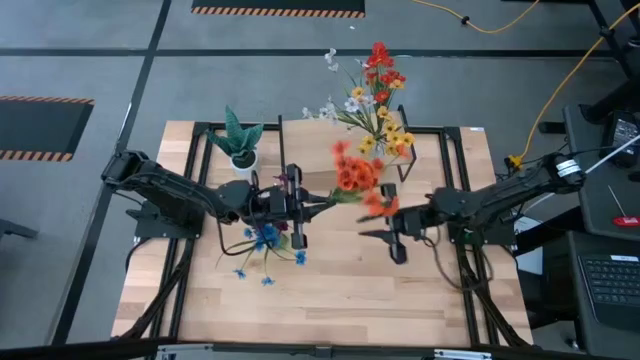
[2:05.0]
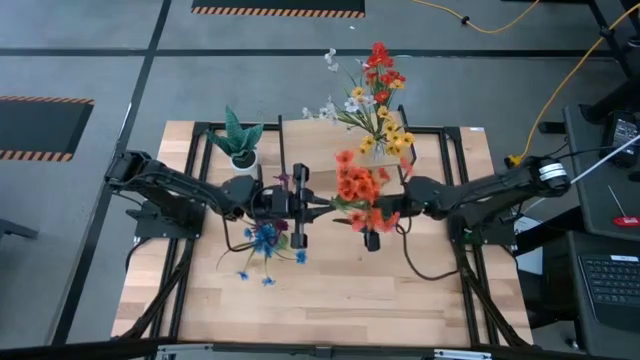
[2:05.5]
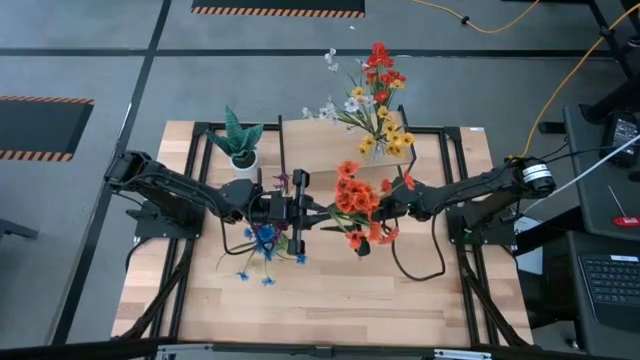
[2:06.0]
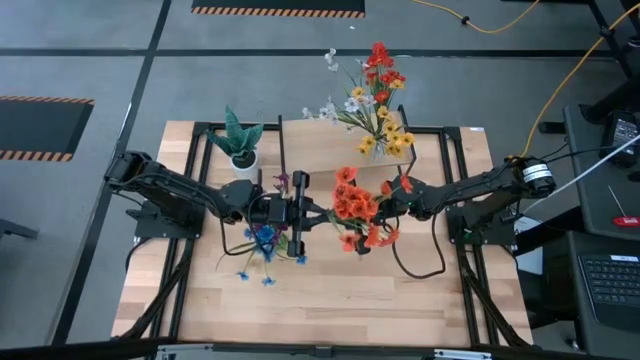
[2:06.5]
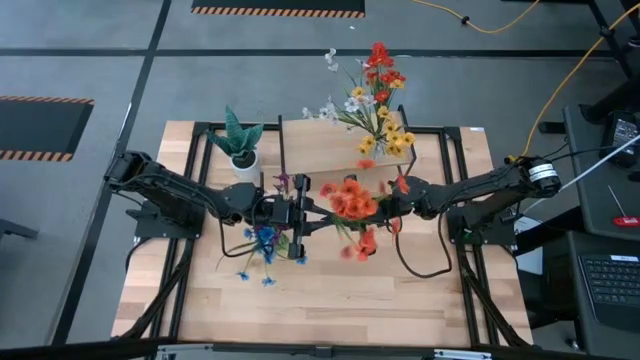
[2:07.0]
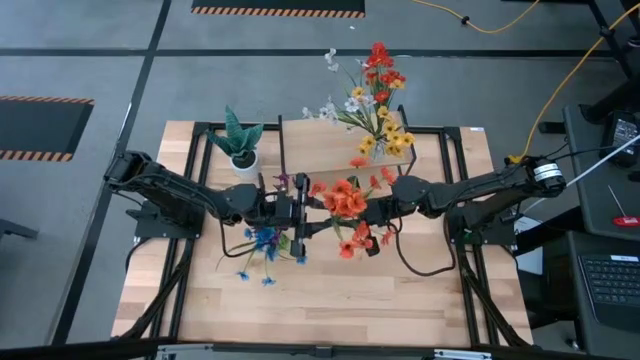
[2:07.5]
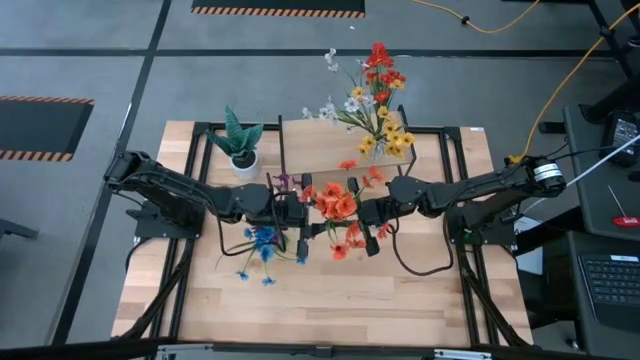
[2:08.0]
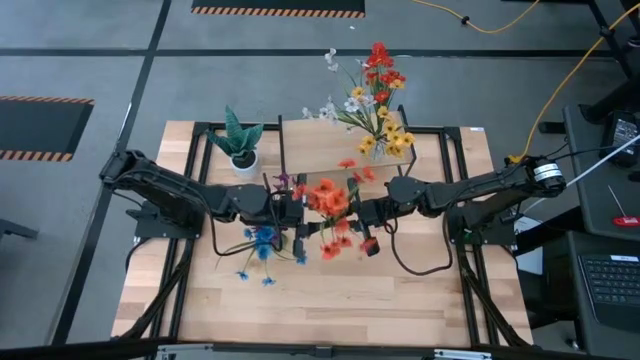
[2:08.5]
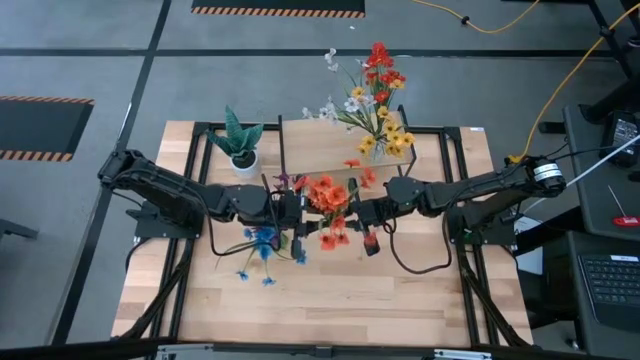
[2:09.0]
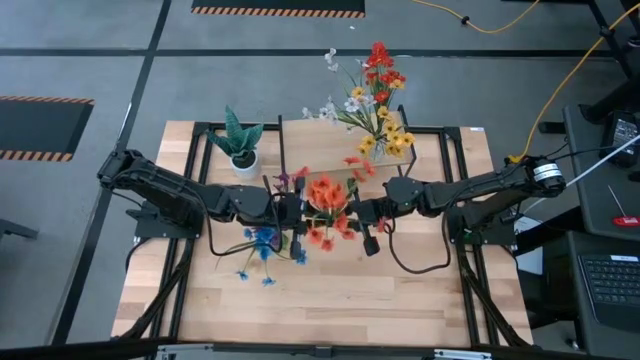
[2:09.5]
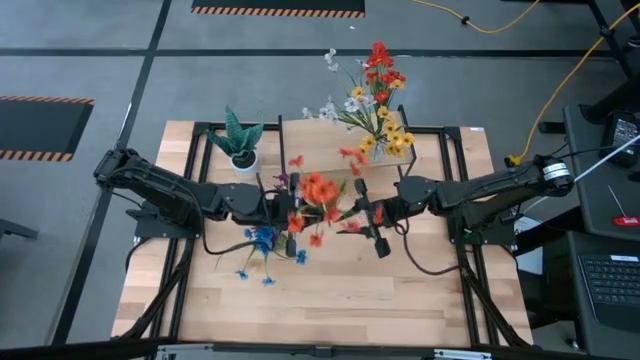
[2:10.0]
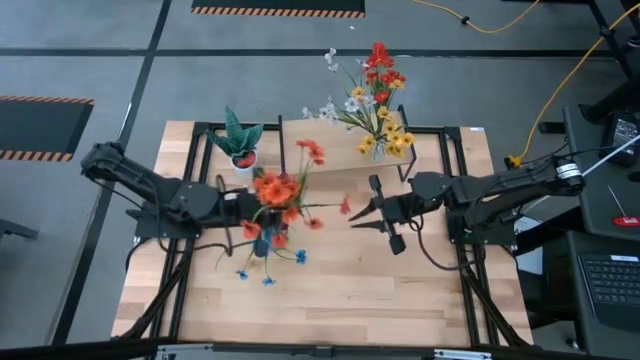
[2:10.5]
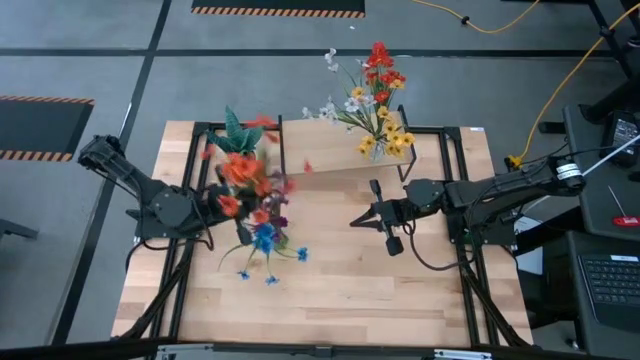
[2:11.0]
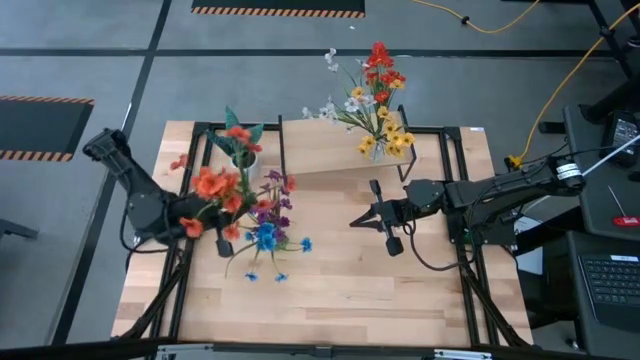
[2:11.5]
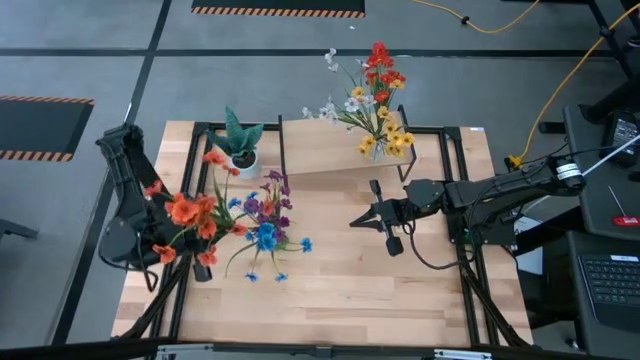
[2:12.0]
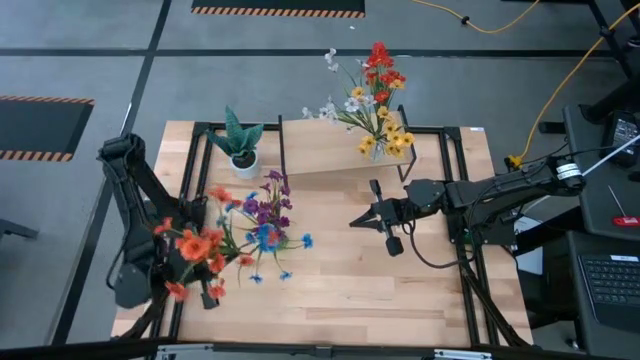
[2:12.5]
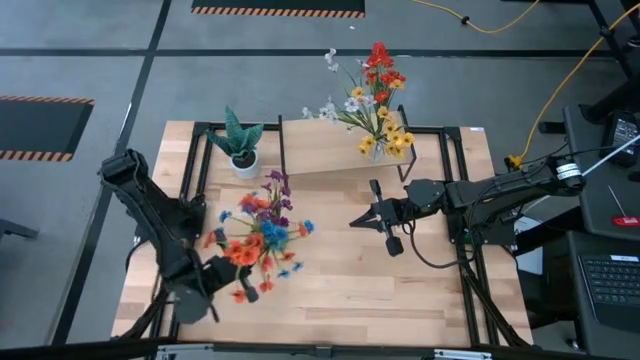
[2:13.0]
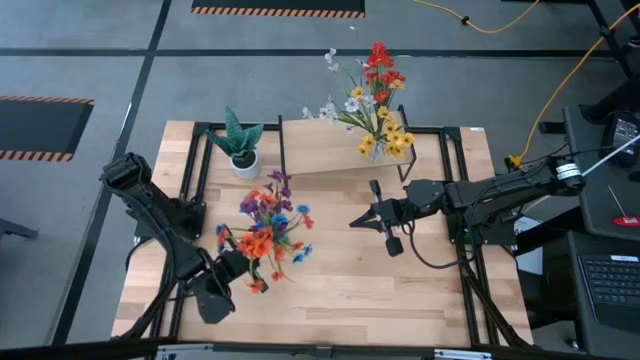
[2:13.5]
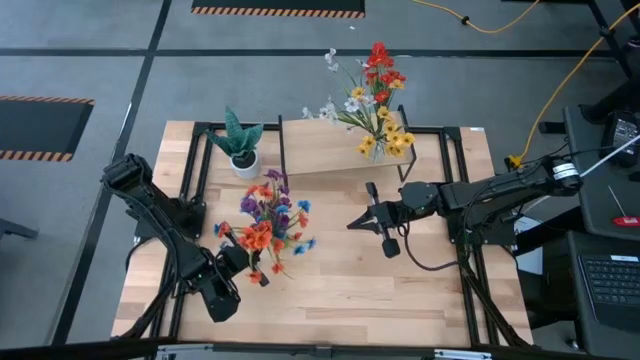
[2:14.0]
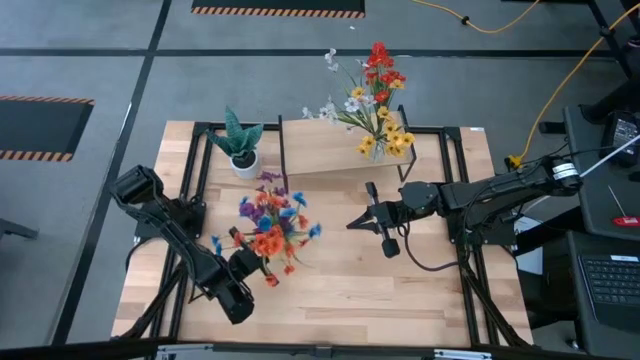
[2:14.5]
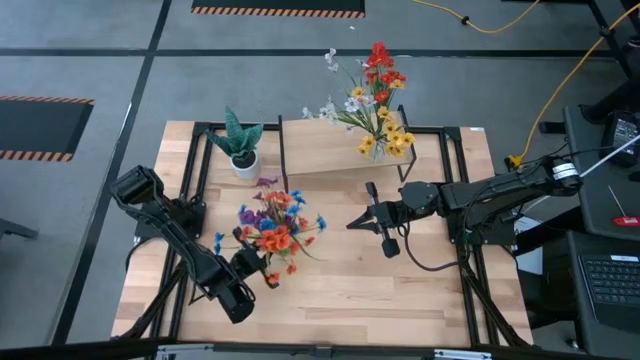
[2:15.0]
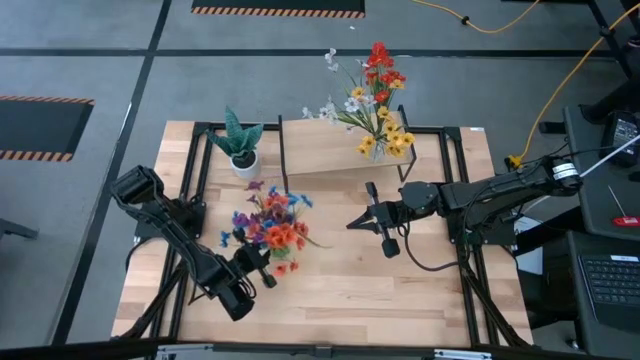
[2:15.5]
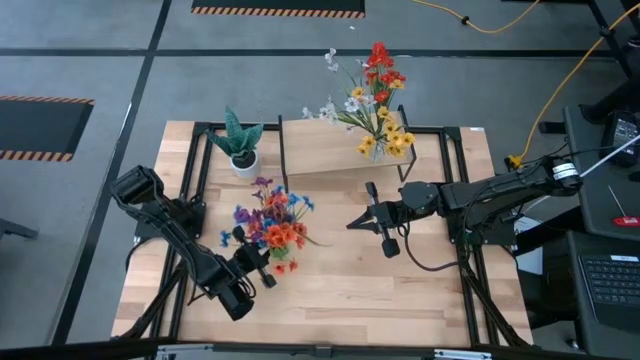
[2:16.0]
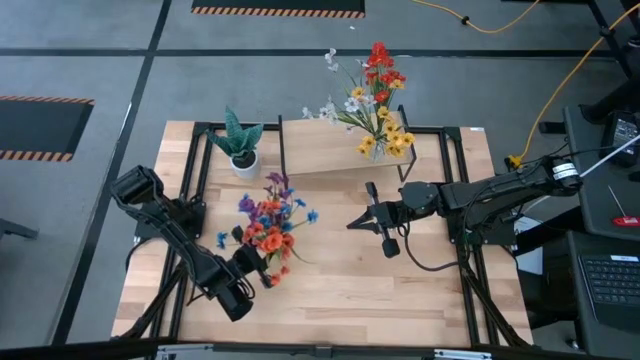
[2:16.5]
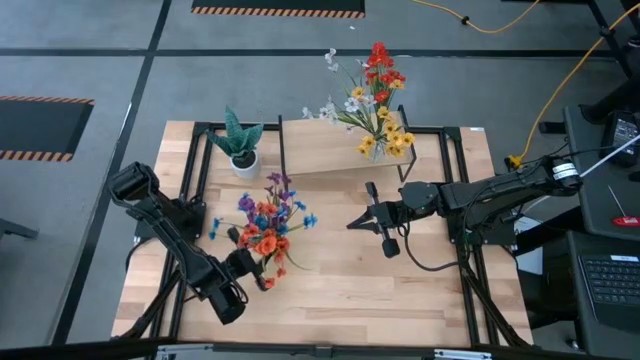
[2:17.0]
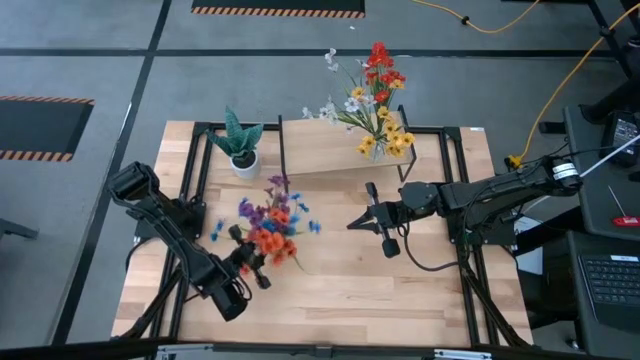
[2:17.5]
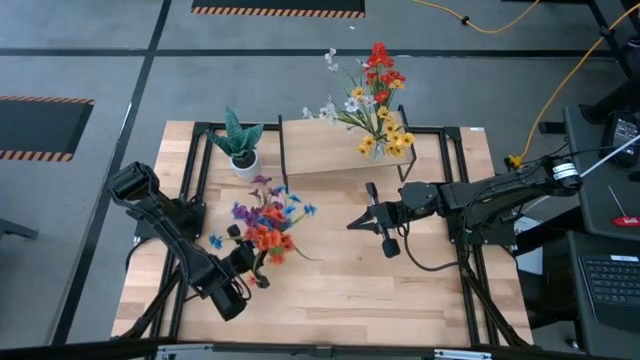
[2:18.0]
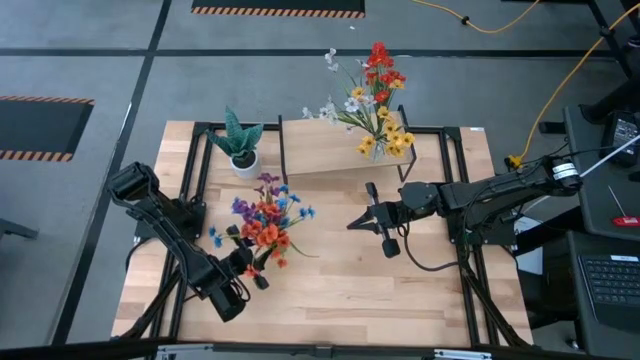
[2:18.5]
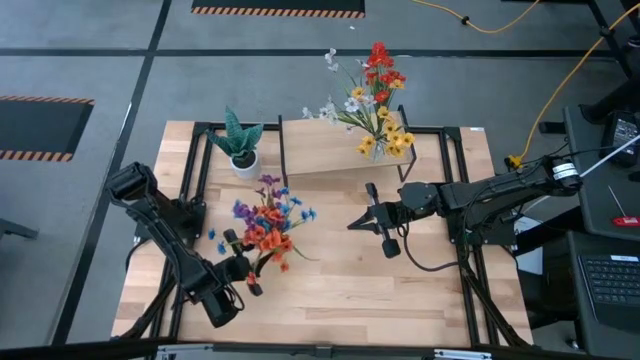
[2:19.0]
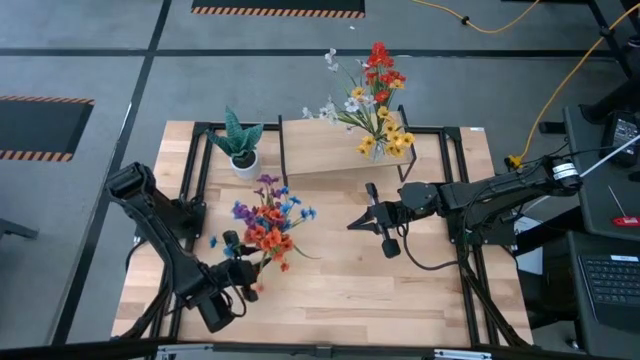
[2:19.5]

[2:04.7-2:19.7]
Task: Pick and place flowers into a vace then onto a shelf
Put the orange flowers into the green transparent vase

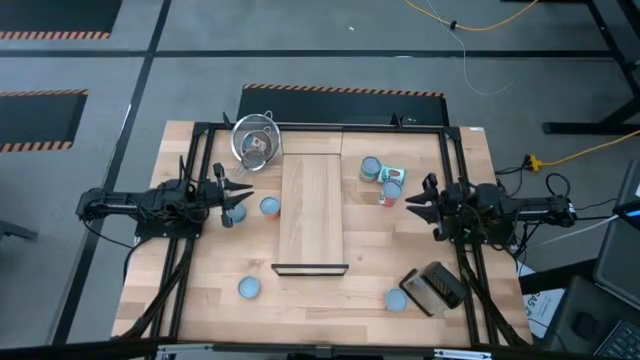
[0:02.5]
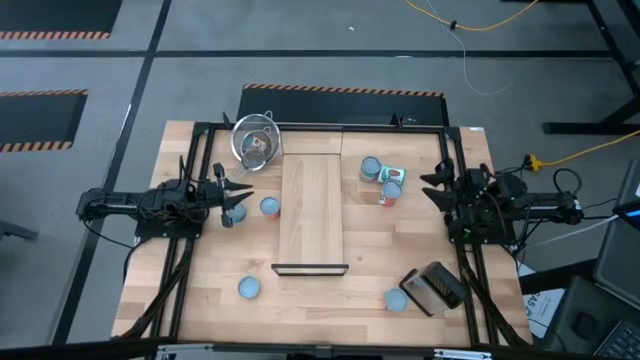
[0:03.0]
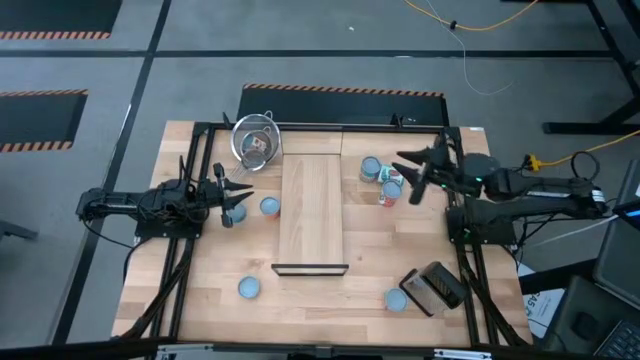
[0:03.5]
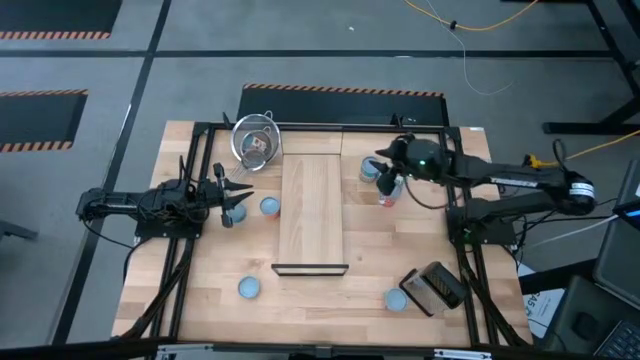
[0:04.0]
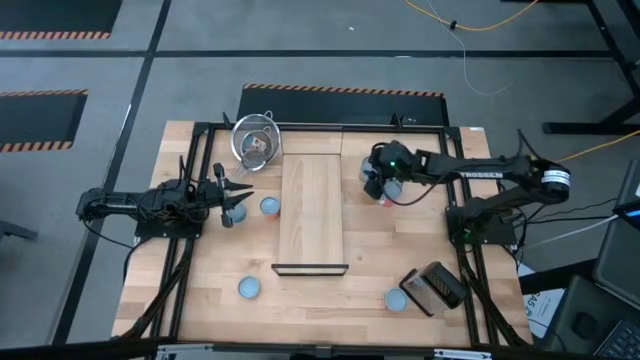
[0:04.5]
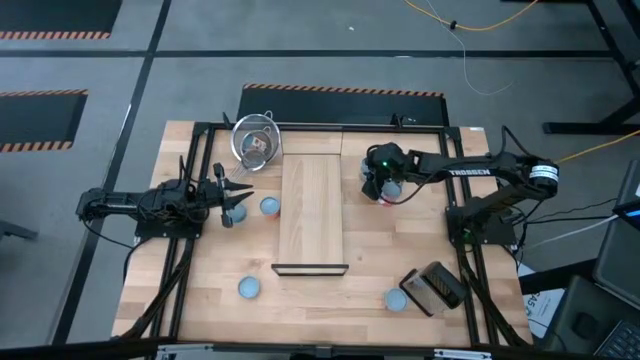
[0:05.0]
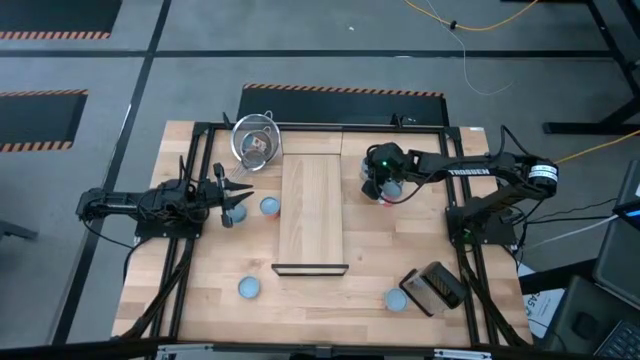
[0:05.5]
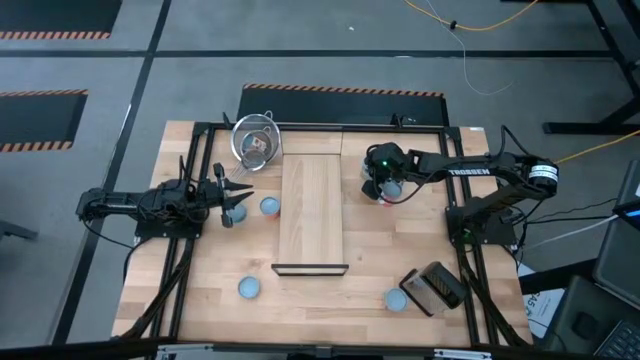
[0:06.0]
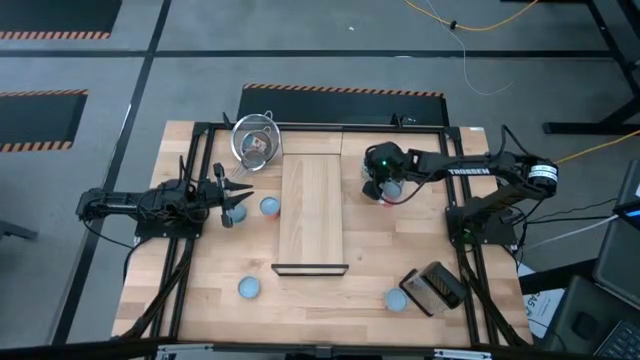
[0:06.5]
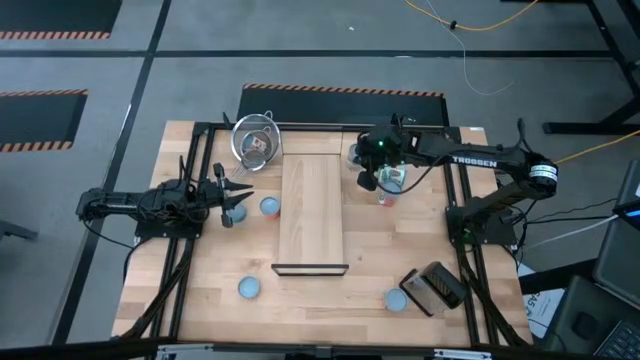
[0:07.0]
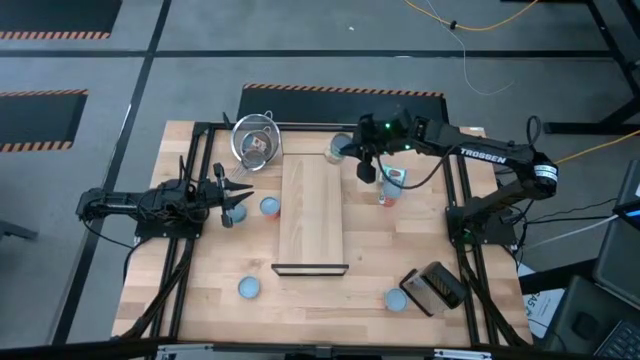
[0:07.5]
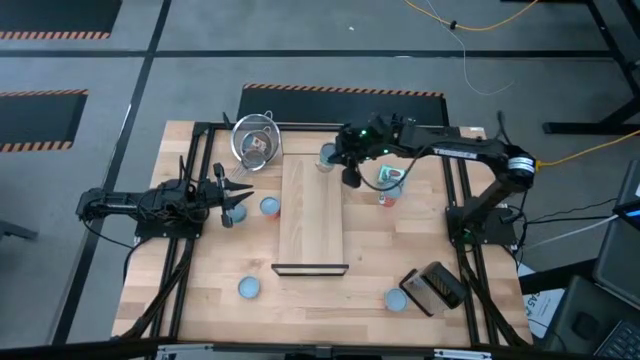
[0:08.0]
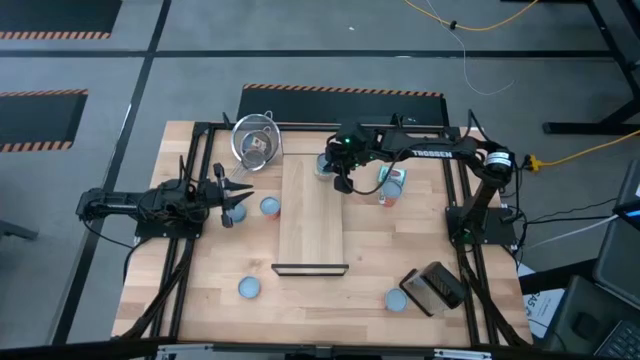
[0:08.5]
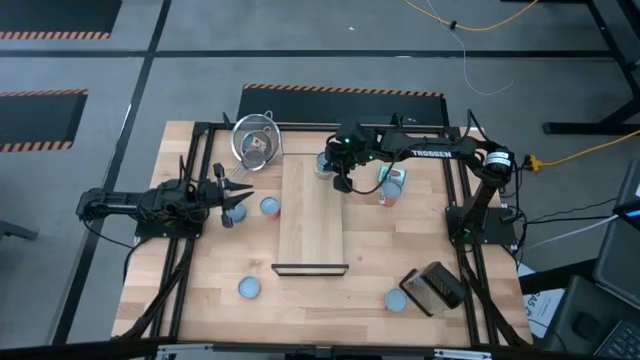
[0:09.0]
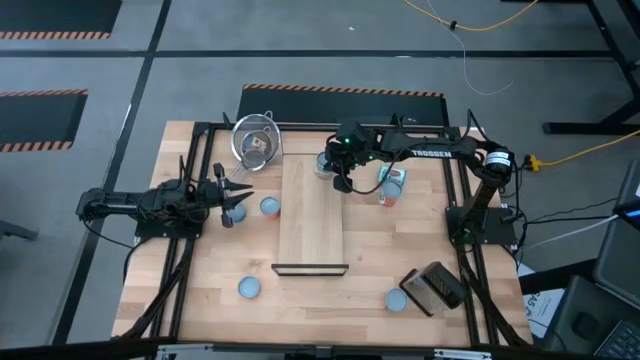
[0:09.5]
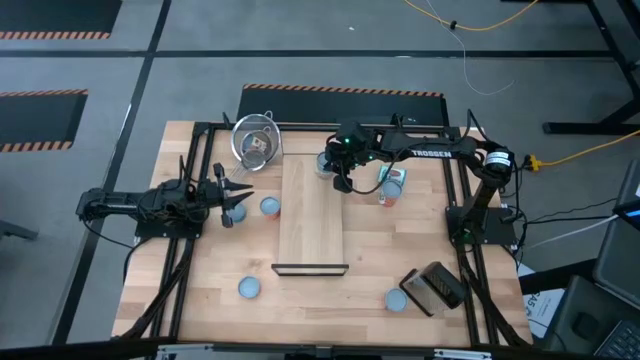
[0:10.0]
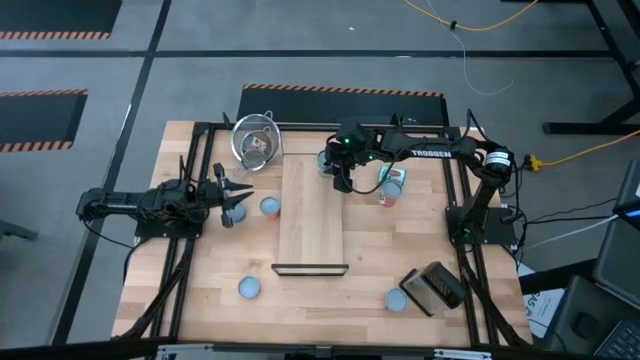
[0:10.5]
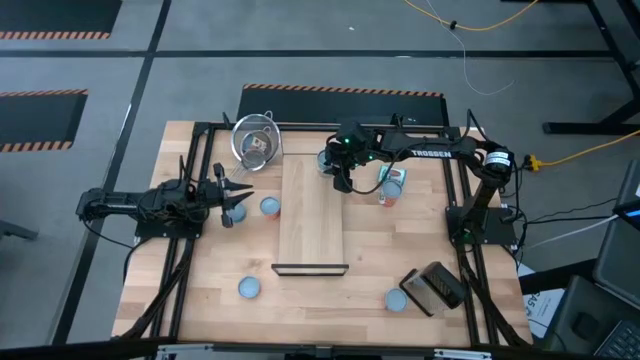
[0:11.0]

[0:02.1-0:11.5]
Task: Pick and place cans onto a shelf
Put the canned chicken soup on the shelf
